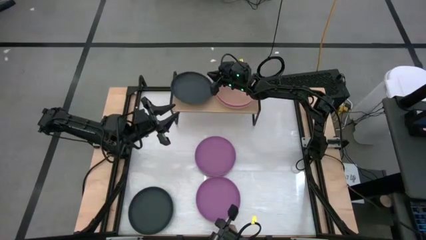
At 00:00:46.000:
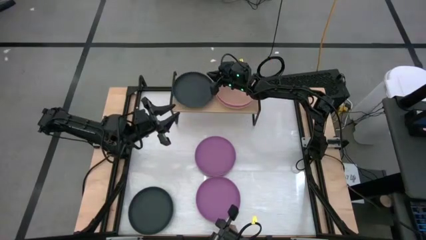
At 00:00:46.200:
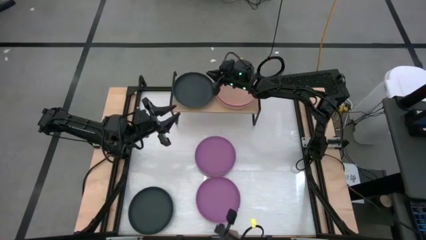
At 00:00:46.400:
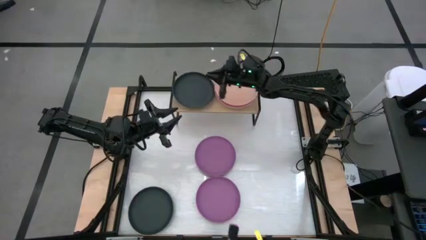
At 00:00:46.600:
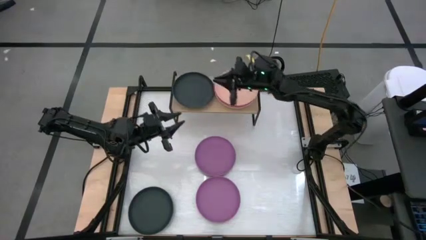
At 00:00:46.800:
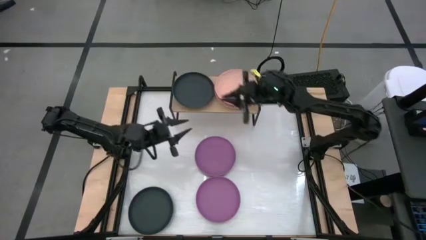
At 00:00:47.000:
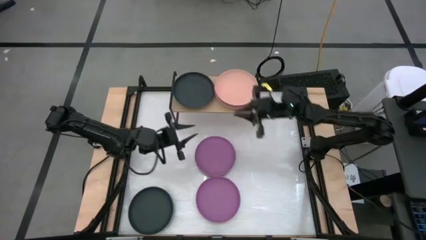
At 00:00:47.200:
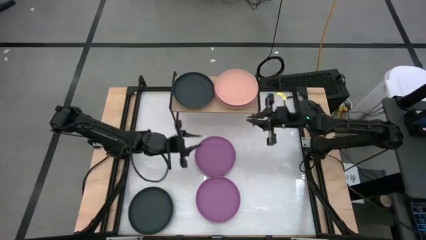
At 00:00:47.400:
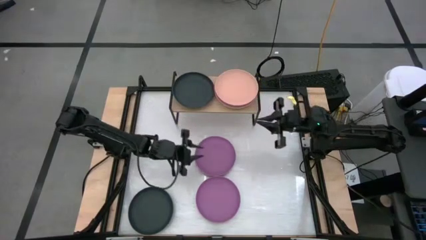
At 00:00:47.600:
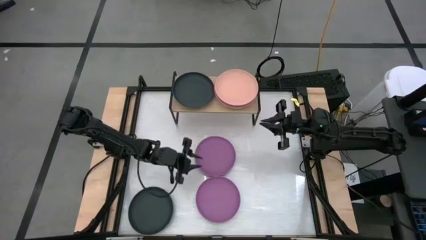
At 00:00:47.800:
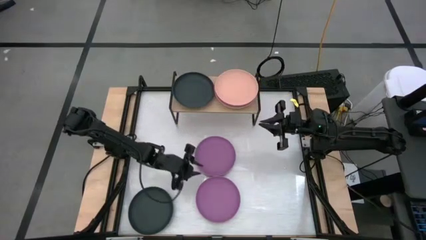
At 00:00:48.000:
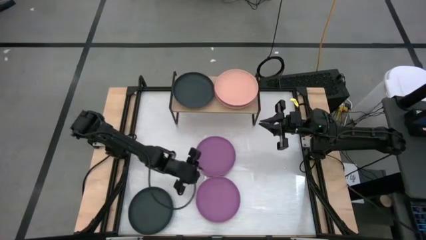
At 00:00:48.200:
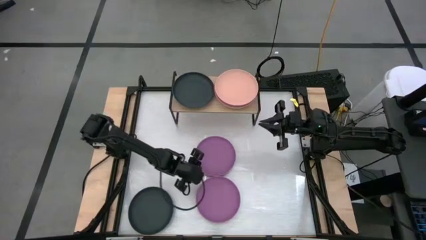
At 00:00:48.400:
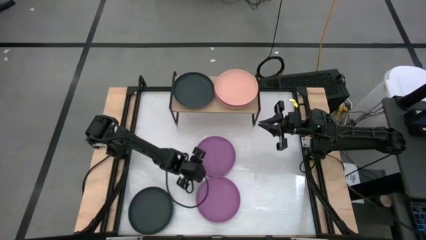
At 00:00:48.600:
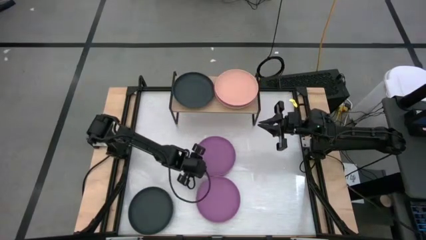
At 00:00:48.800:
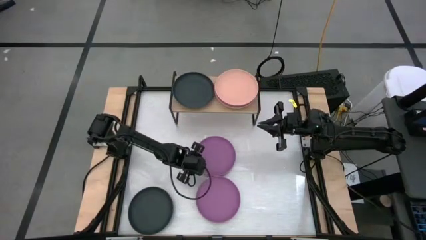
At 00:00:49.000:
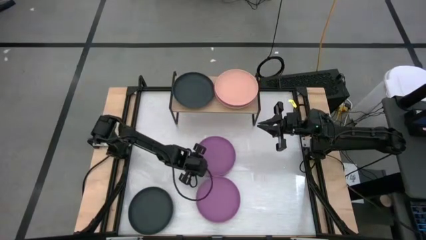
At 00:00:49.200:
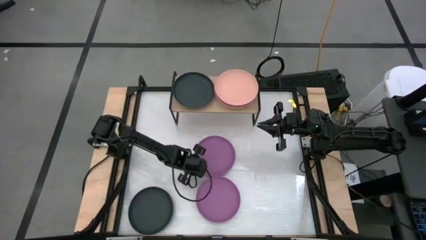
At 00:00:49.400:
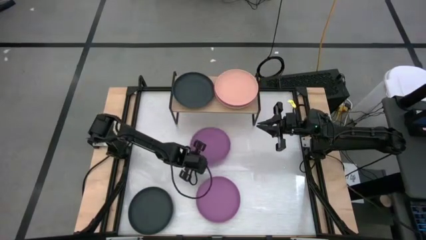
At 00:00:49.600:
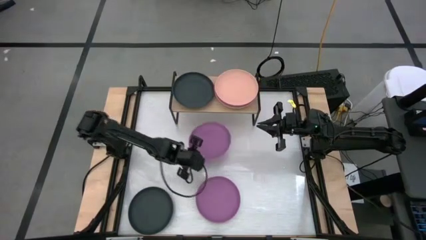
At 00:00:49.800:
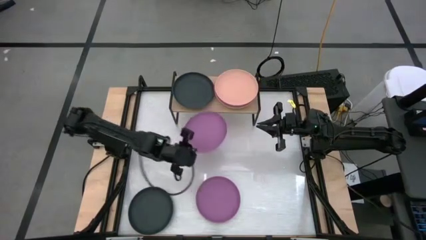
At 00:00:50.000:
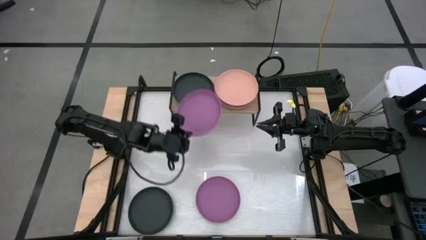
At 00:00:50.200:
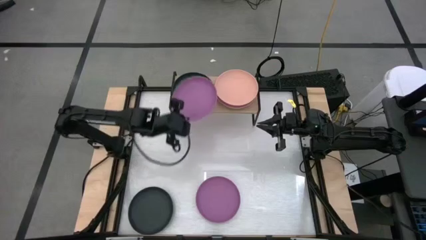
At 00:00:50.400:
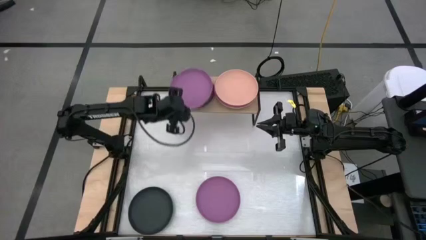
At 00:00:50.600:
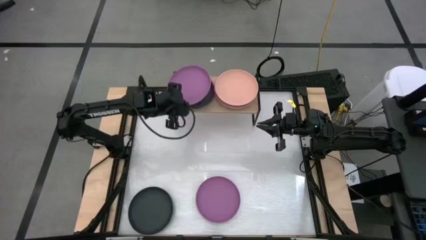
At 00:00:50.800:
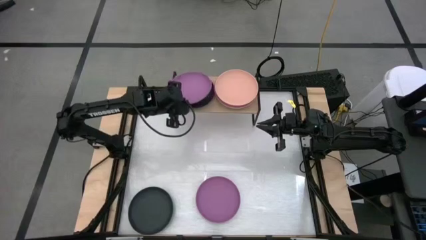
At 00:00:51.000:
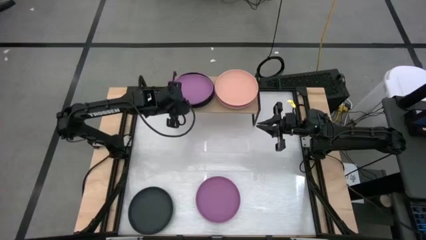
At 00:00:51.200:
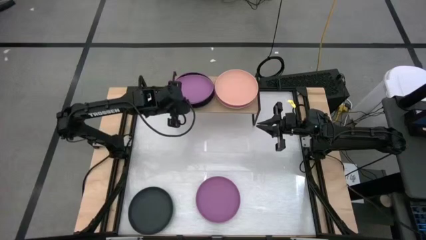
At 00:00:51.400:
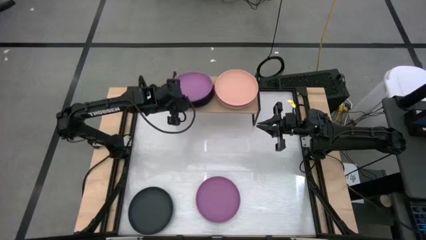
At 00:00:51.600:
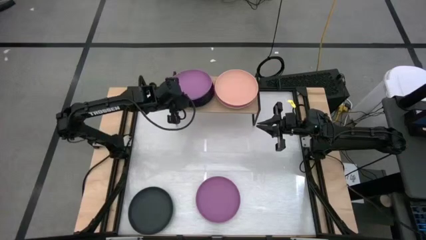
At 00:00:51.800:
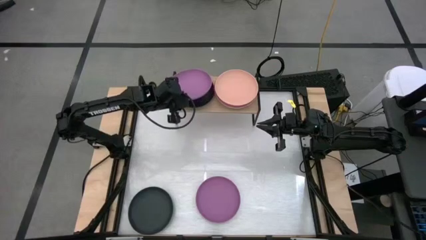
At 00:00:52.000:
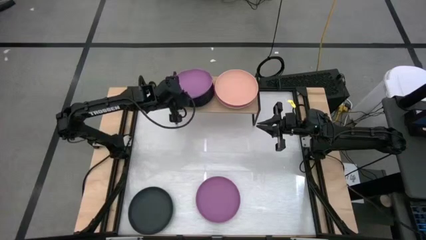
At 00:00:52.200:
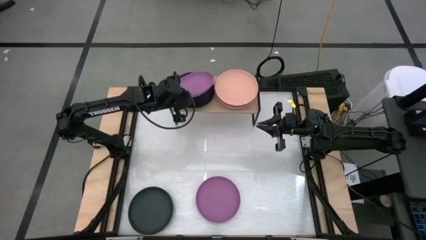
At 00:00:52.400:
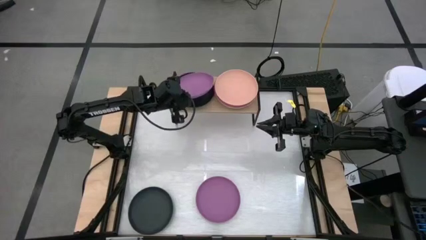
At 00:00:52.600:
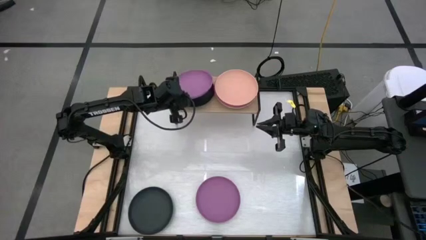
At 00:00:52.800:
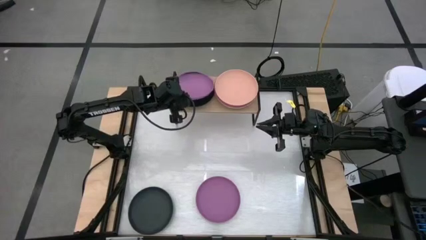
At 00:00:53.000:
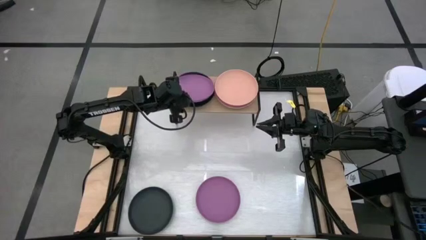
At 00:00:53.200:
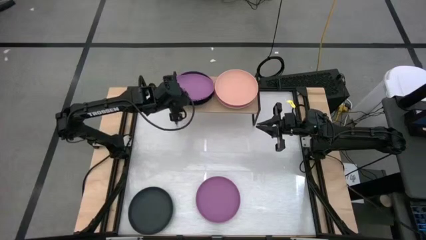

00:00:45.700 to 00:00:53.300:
Task: Place and stack plates onto a shelf
Stack the top violet plate on top of the black plate on the shelf

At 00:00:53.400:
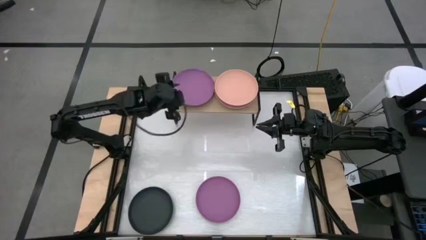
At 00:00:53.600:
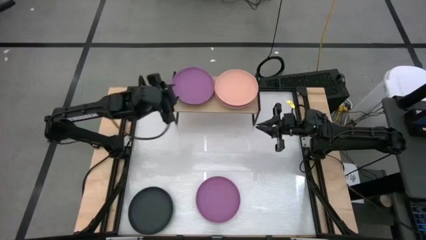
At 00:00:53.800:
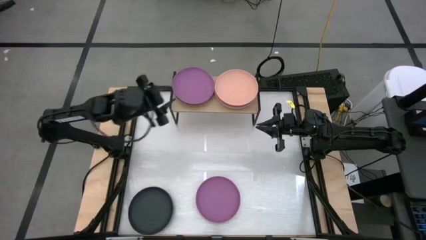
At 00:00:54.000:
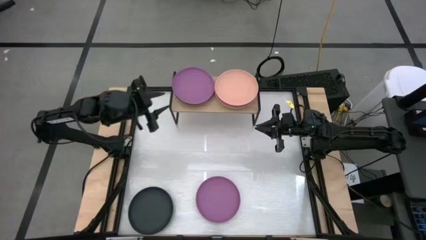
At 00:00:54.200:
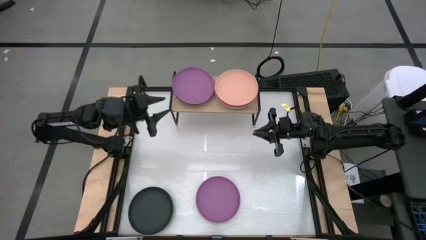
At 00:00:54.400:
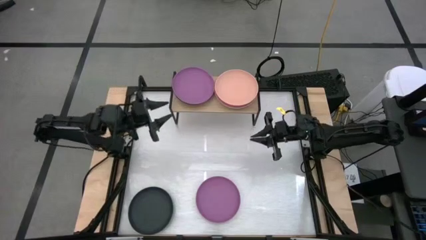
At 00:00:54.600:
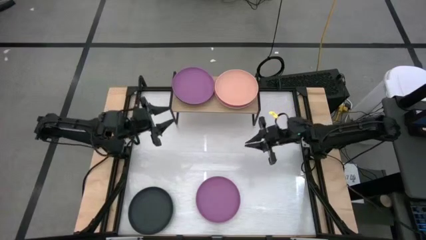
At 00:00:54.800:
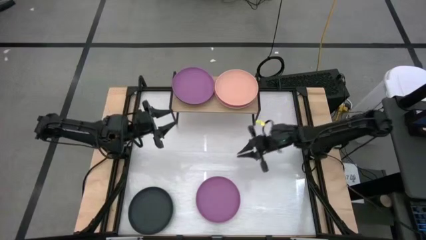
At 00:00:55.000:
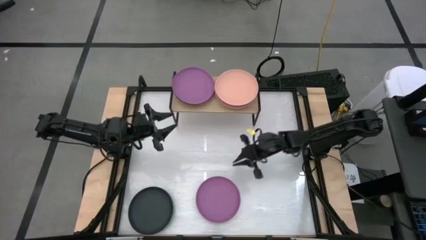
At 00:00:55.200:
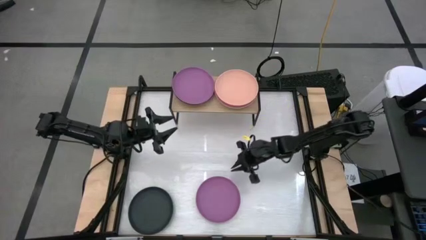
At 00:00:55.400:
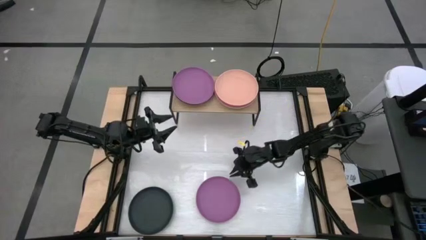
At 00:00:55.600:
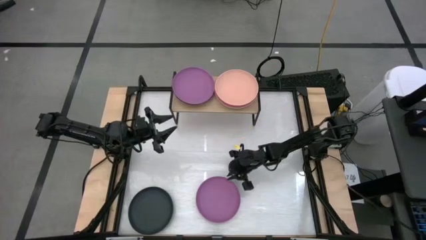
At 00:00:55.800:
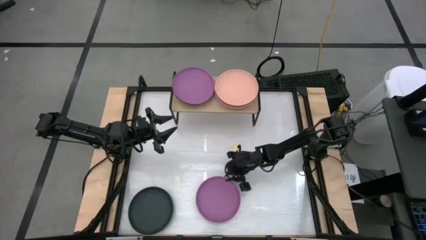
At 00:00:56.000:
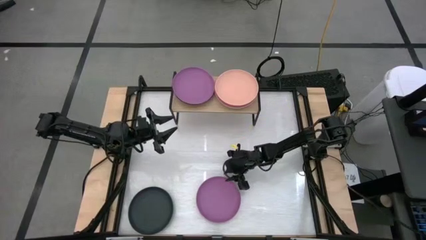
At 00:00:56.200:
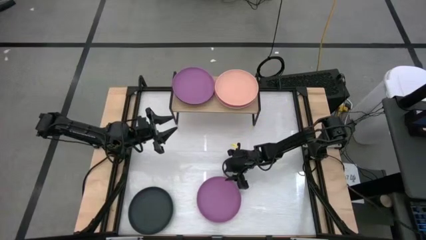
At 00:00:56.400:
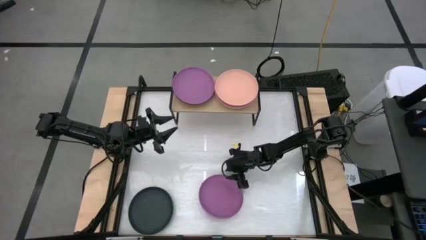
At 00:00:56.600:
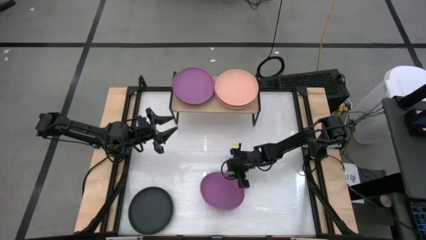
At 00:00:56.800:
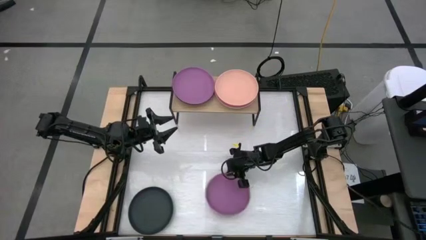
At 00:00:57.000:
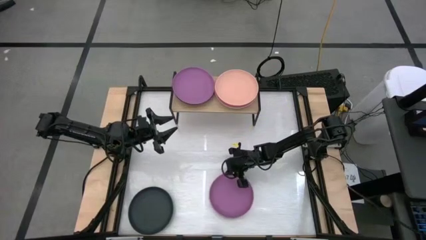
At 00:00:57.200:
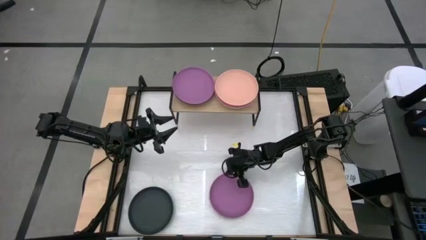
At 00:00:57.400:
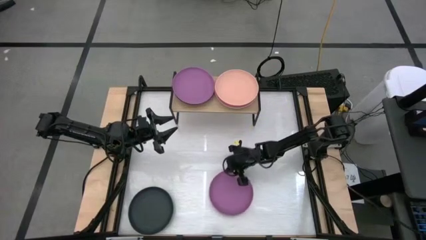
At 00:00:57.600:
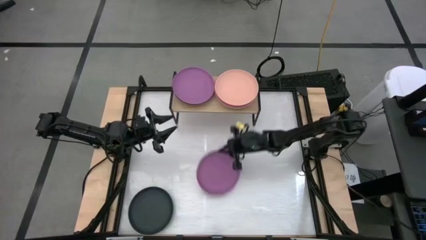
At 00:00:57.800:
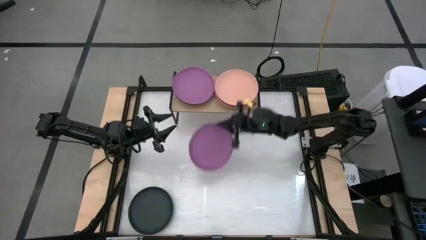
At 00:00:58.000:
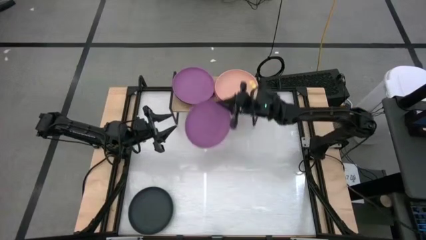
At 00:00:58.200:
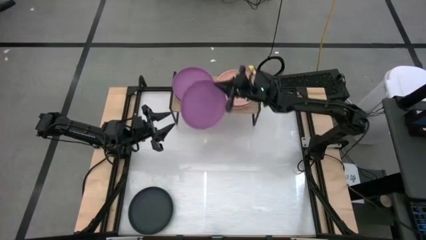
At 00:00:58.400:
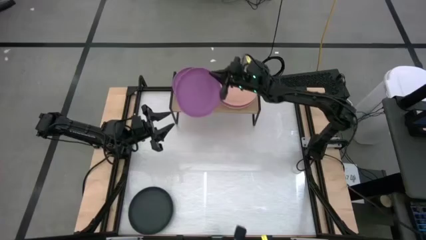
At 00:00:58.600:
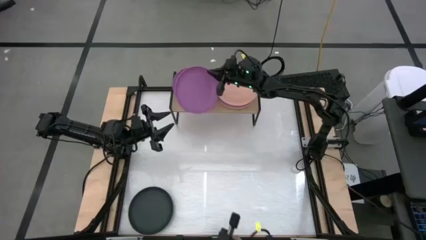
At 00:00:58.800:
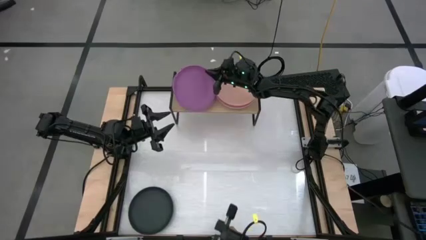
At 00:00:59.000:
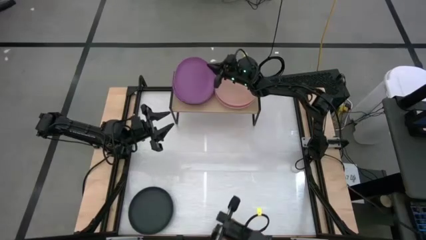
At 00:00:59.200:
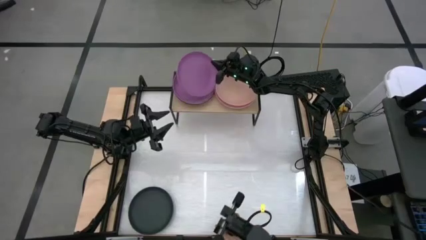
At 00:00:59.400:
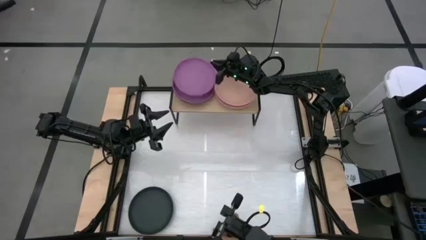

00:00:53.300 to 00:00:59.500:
Stack the violet plate on top of the violet plate on the shelf

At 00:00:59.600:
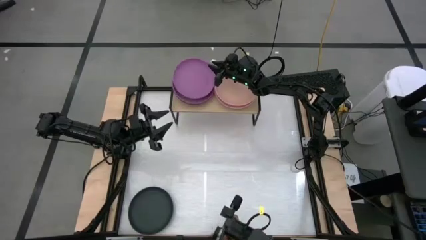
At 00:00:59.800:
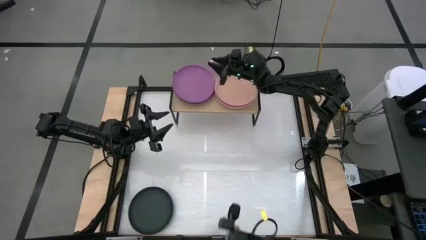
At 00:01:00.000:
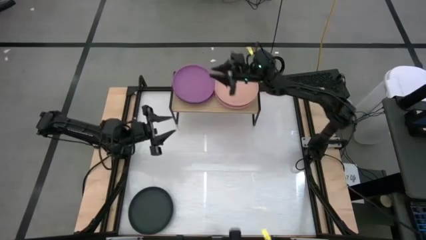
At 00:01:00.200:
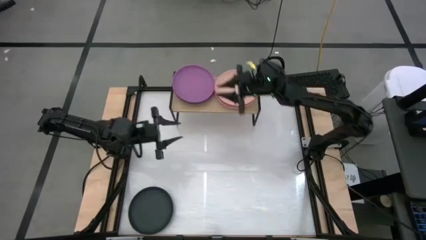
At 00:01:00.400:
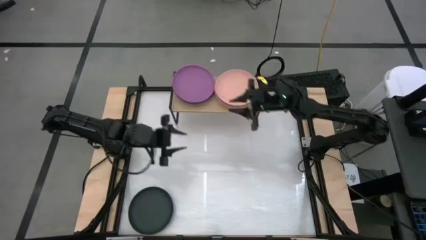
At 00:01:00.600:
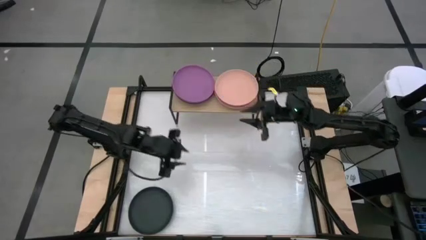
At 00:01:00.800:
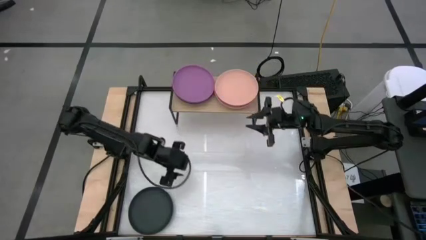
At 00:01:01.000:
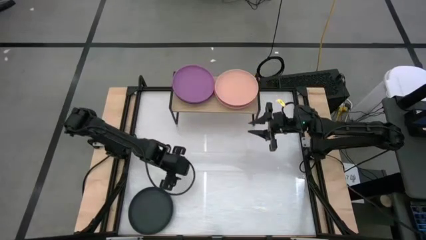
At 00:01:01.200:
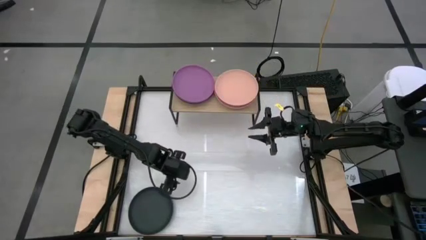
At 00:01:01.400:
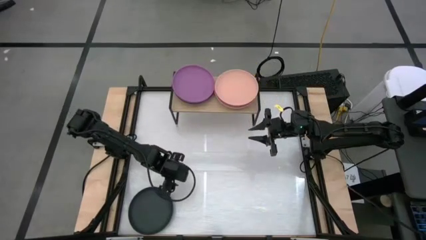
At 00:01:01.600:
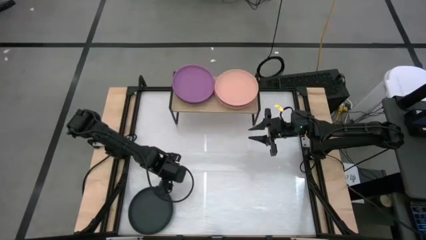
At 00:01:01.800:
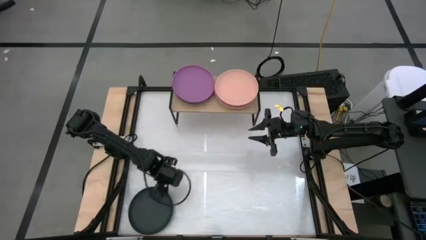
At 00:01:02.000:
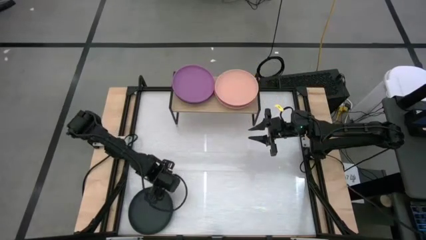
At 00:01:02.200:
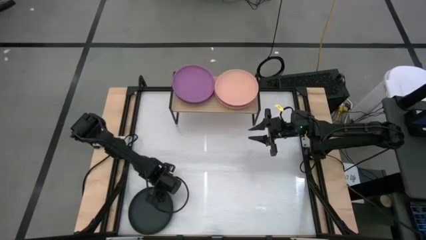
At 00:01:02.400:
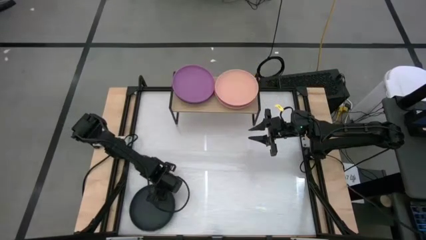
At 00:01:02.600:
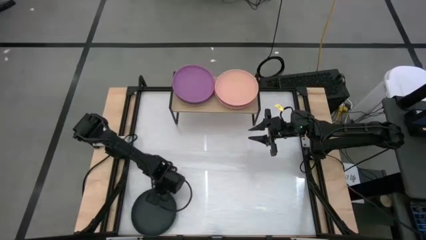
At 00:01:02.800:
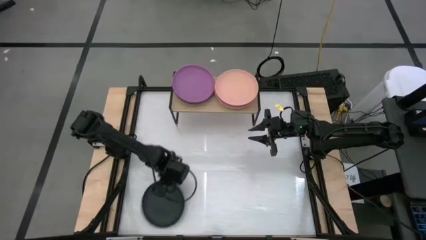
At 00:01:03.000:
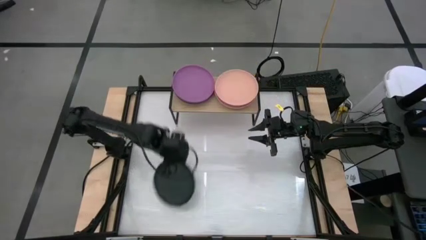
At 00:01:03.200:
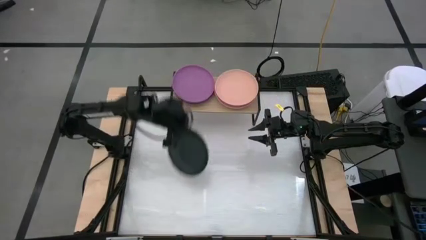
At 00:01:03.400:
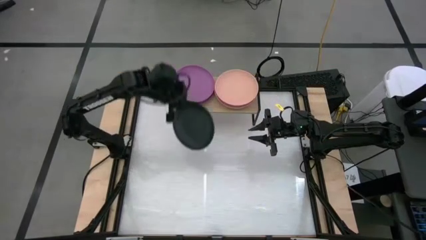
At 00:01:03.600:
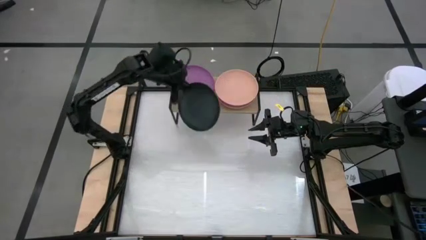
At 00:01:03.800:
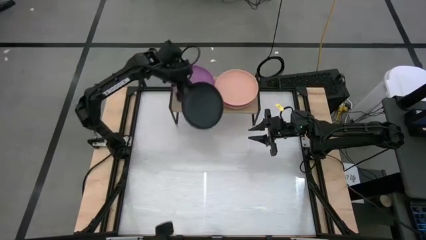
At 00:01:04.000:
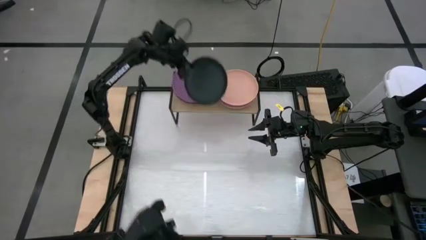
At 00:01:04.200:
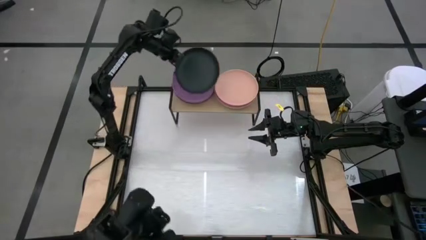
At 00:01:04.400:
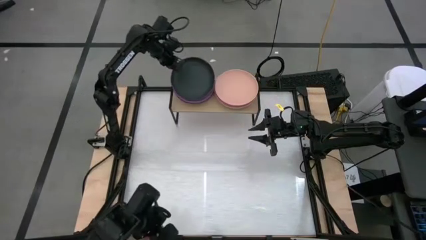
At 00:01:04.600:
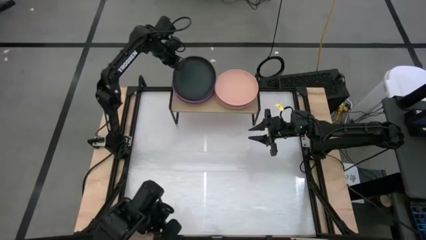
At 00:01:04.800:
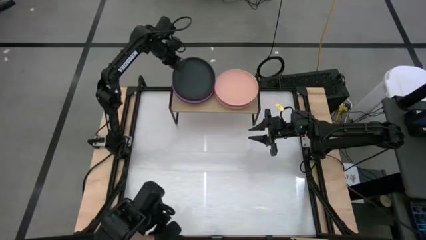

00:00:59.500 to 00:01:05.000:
Stack the black plate on top of the violet plate on the shelf
